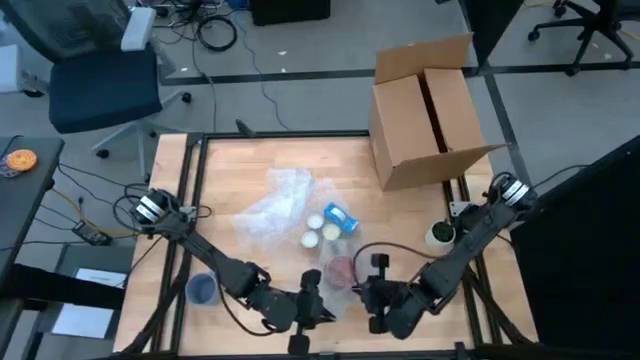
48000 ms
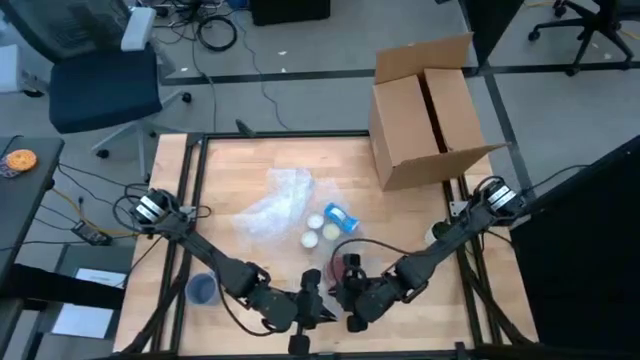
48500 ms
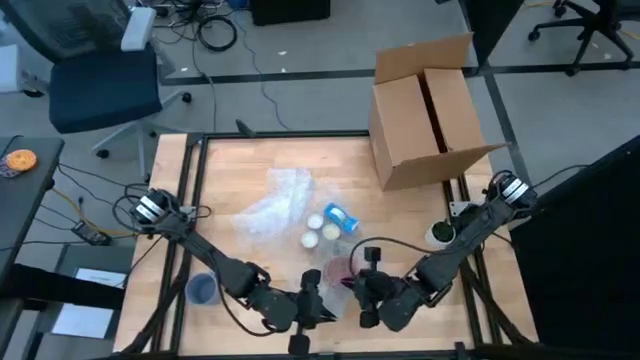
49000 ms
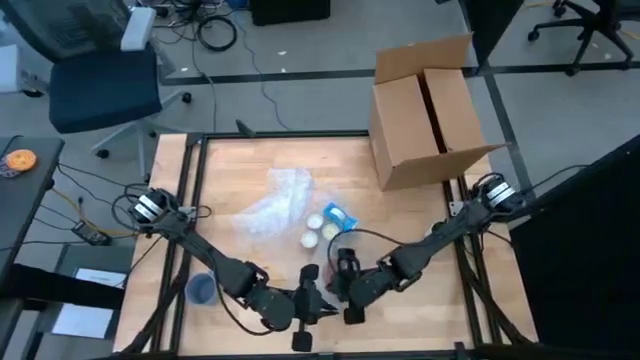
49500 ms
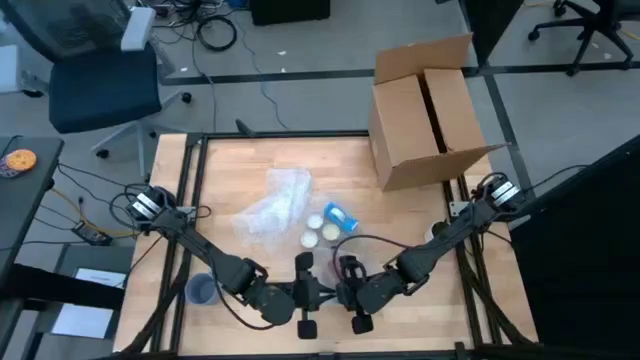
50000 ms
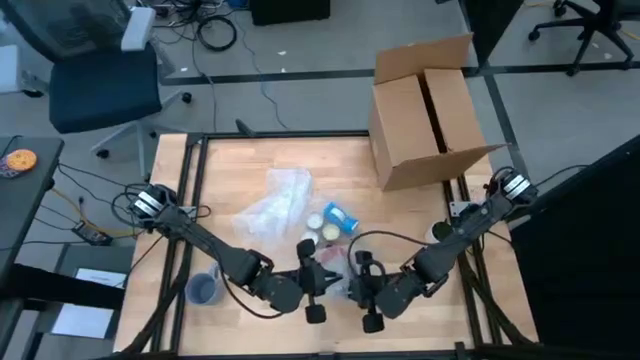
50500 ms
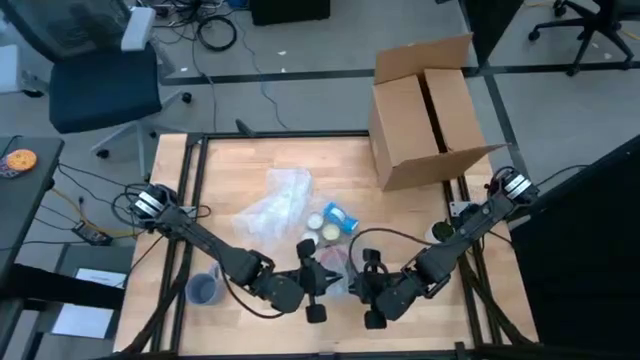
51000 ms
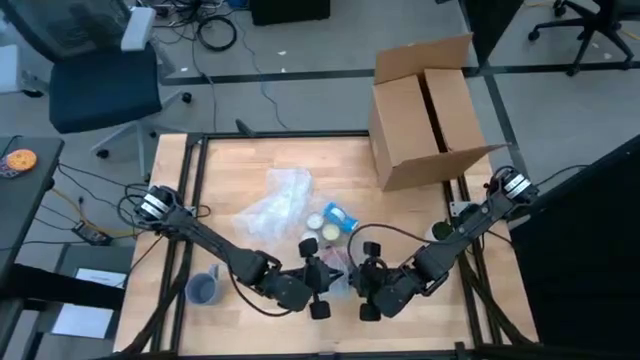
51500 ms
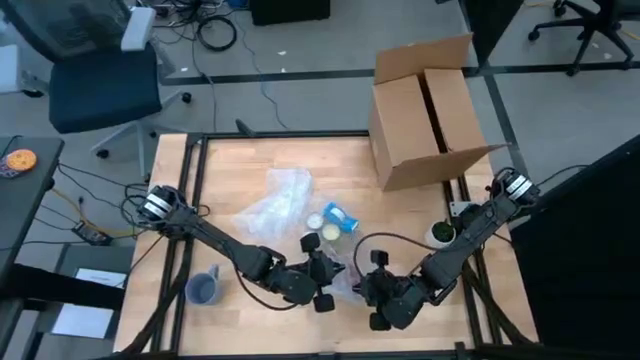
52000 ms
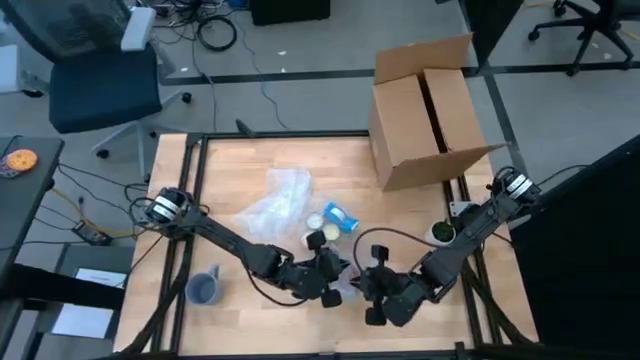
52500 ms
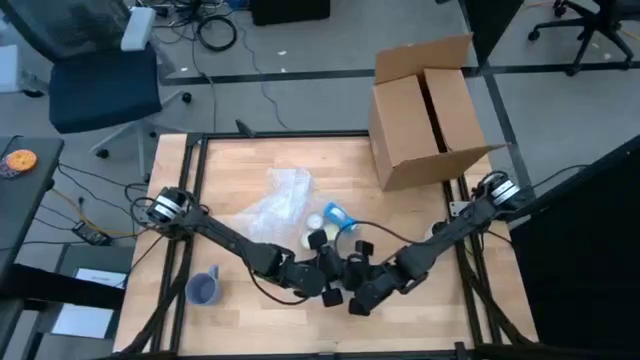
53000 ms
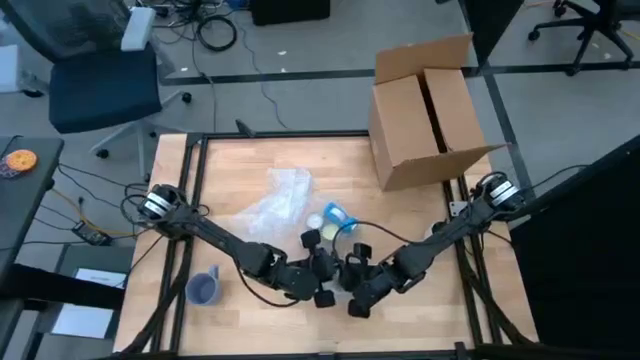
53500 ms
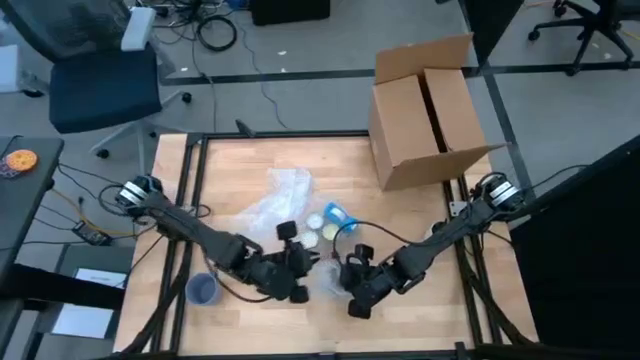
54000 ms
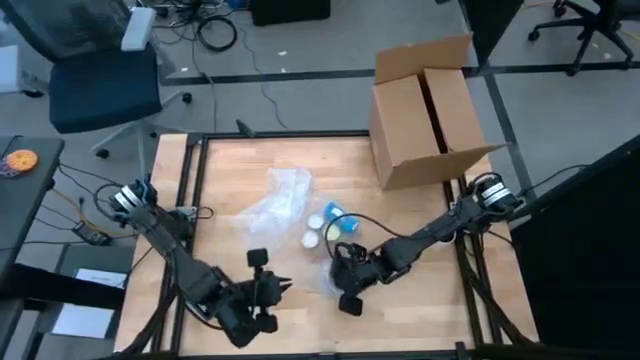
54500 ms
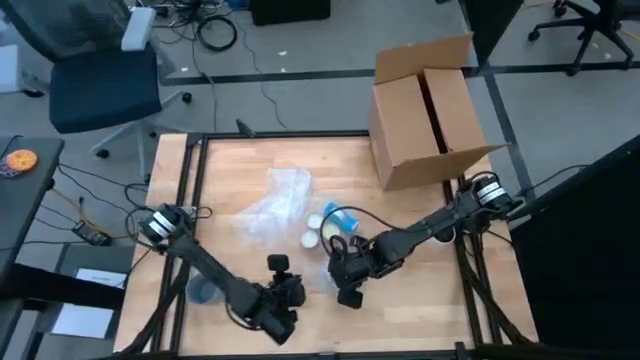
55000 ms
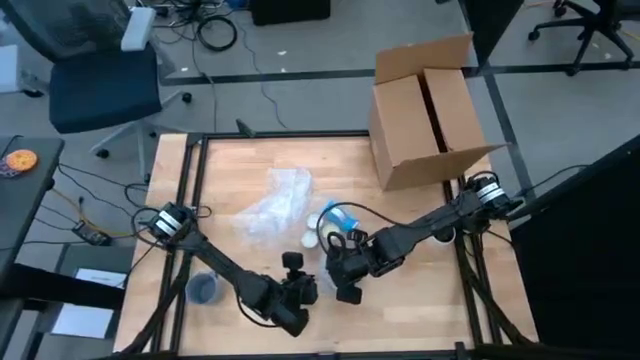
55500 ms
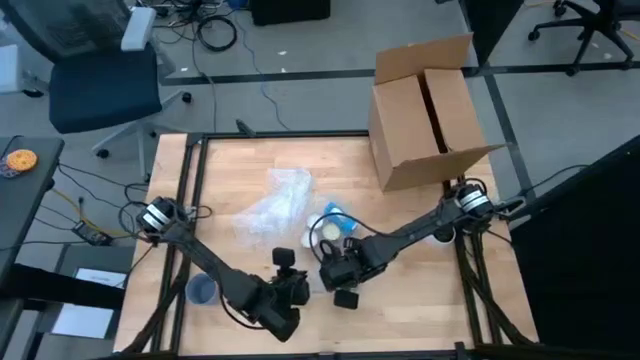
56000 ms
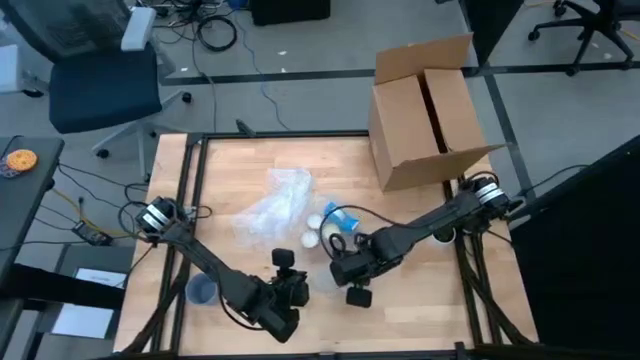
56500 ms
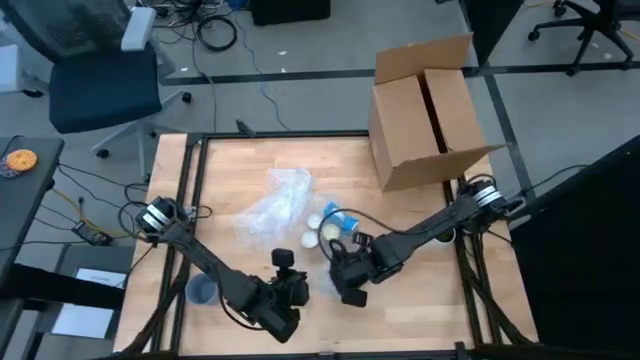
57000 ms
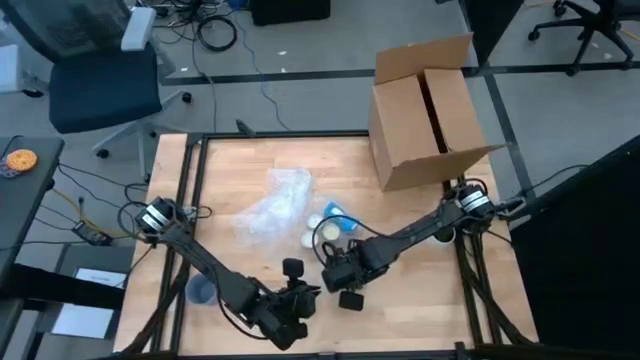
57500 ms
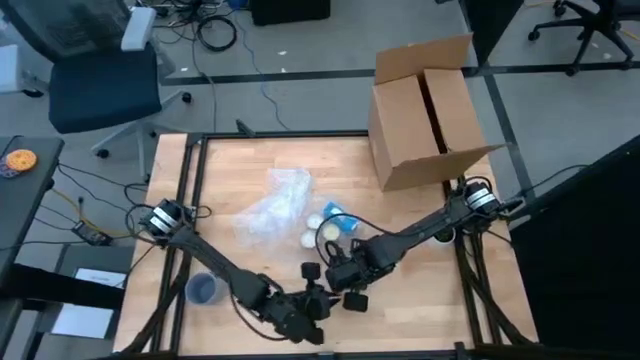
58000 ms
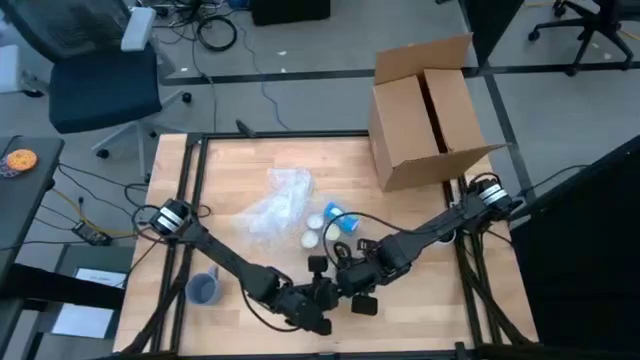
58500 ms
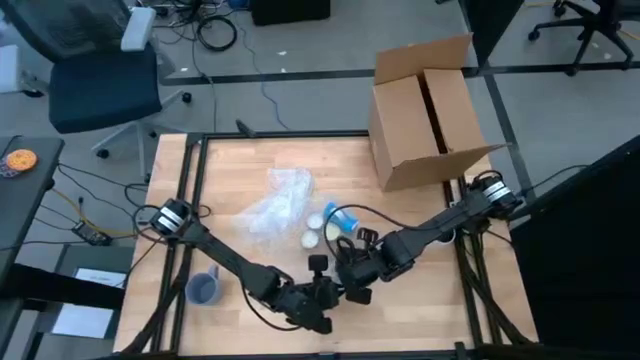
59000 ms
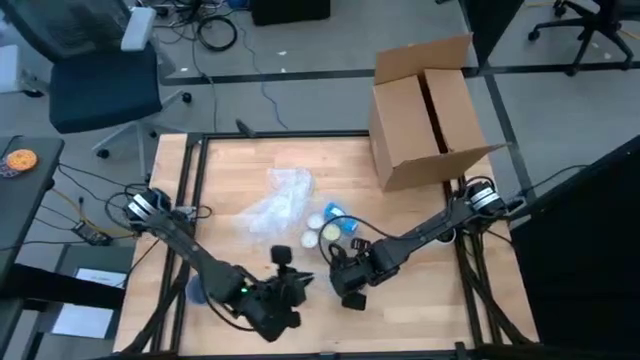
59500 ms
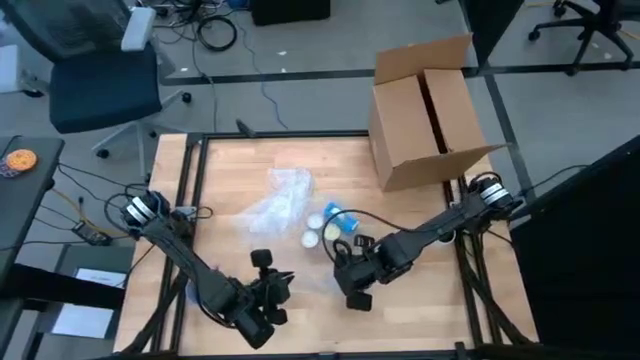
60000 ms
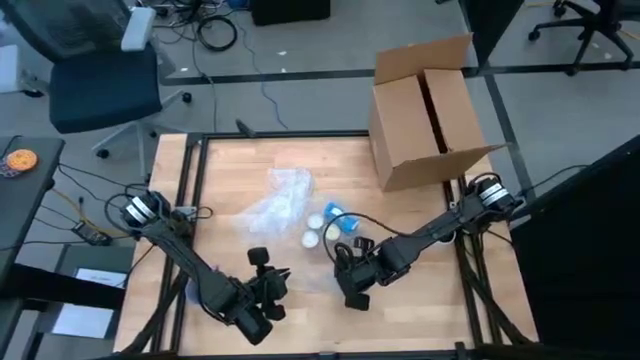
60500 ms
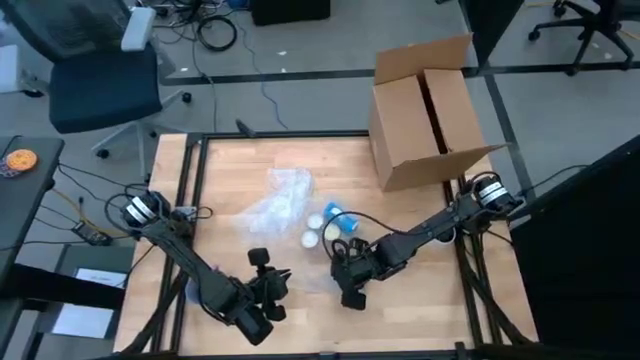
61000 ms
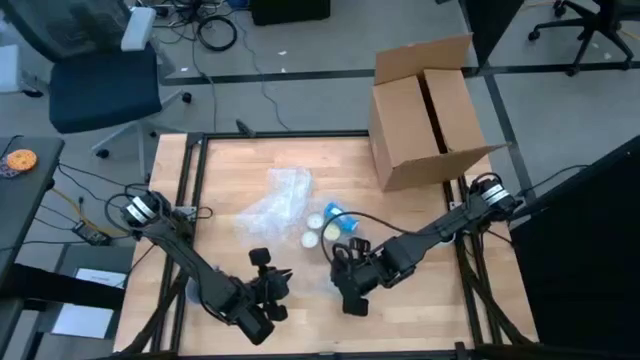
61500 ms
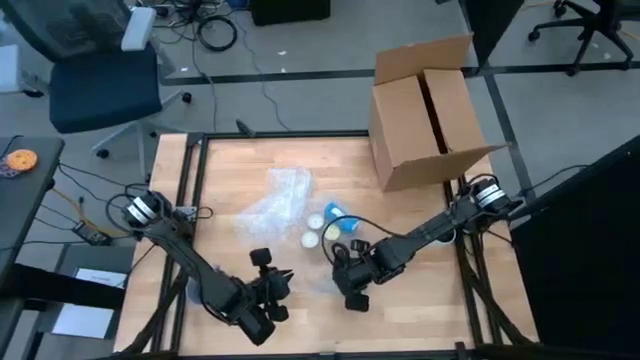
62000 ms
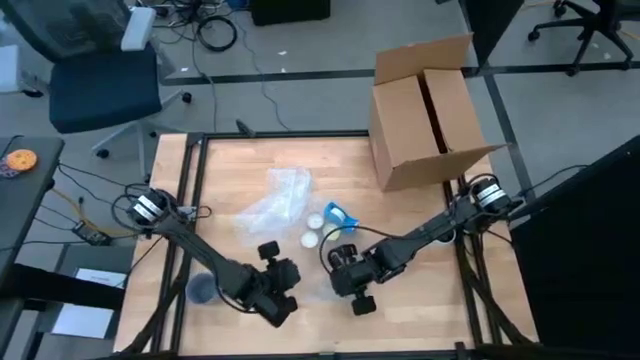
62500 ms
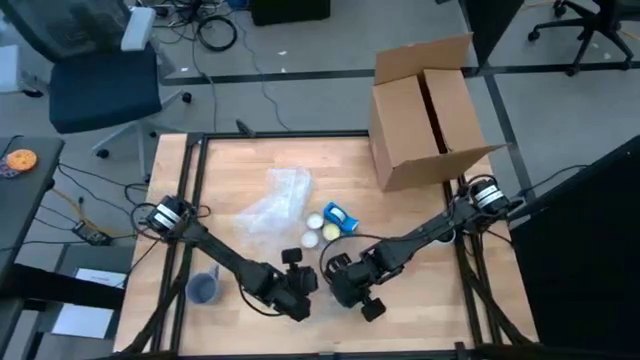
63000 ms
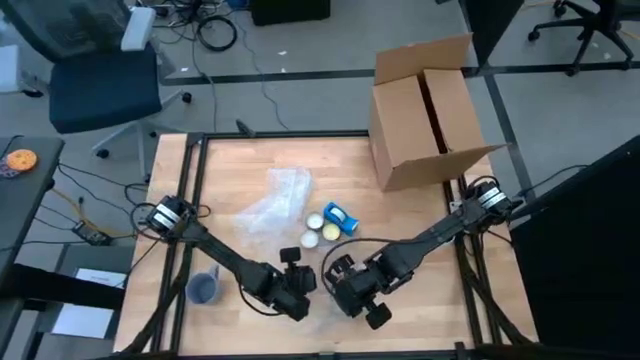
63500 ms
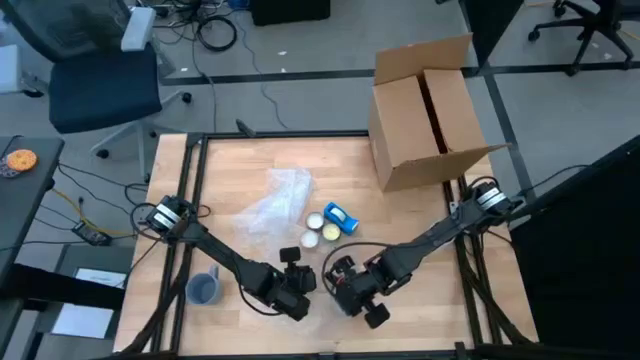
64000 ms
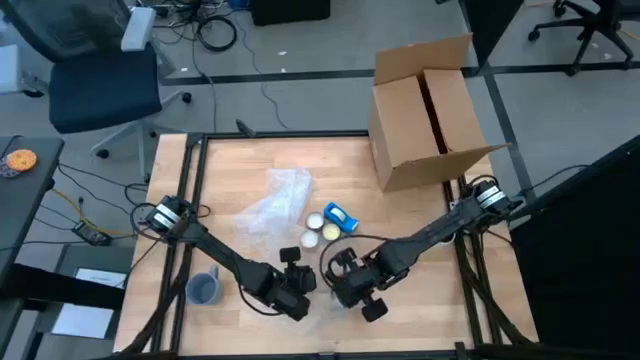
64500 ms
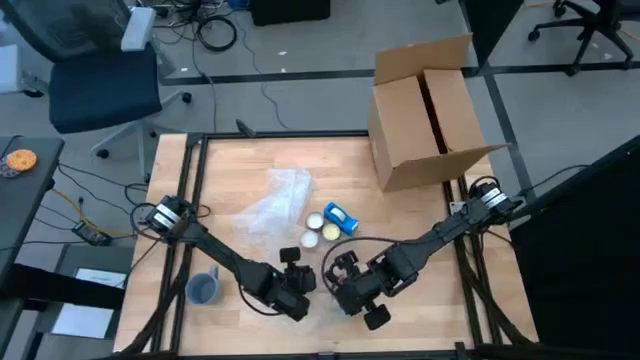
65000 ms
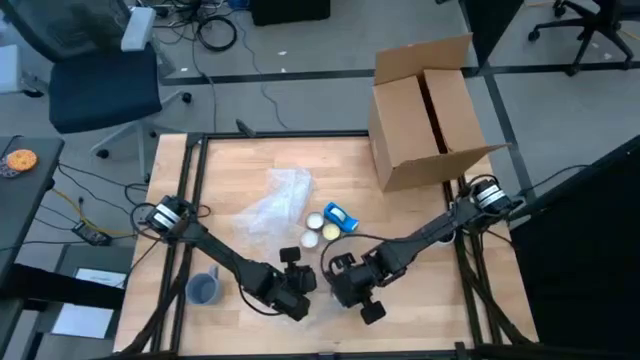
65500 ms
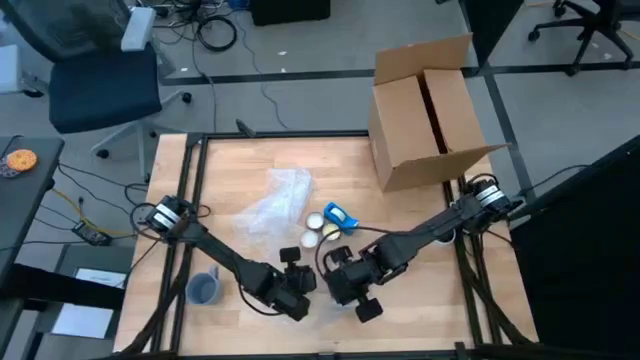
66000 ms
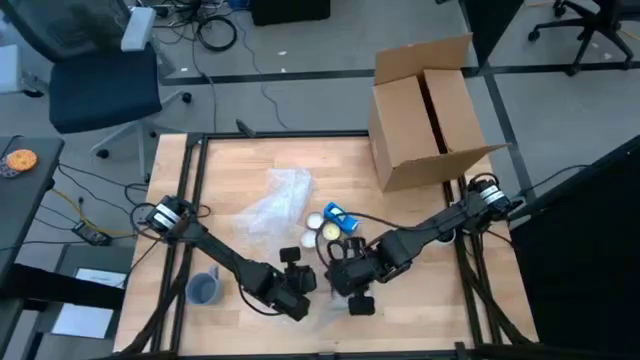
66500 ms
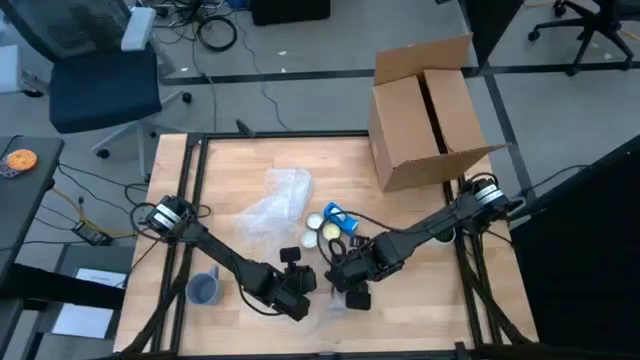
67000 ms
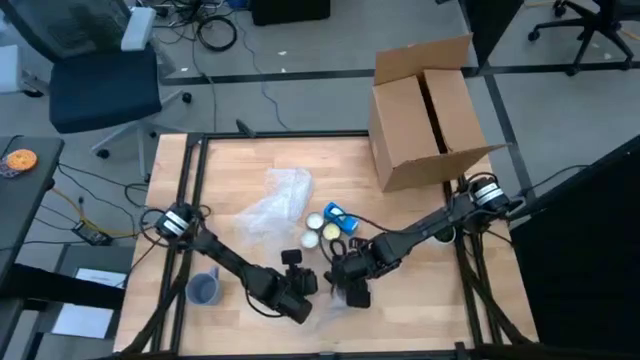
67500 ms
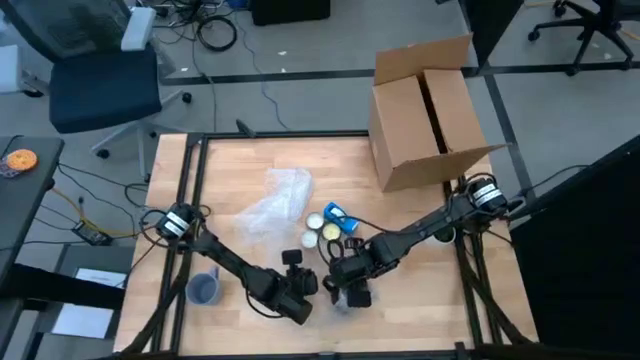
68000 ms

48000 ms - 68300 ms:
Task: wrap mug
Wrap the black mug with the transparent bubble wrap

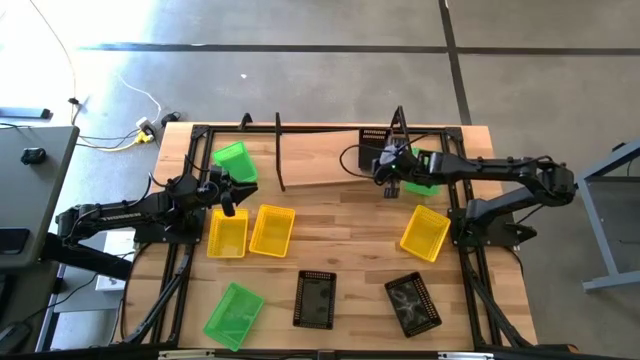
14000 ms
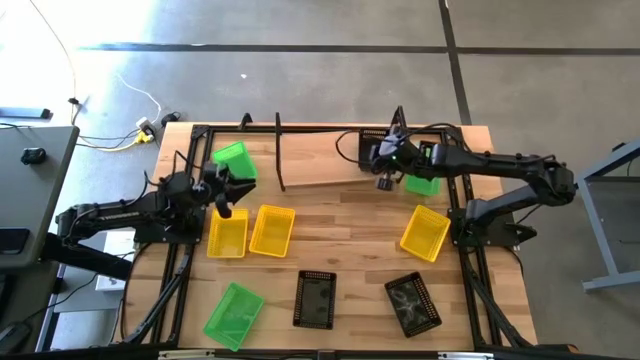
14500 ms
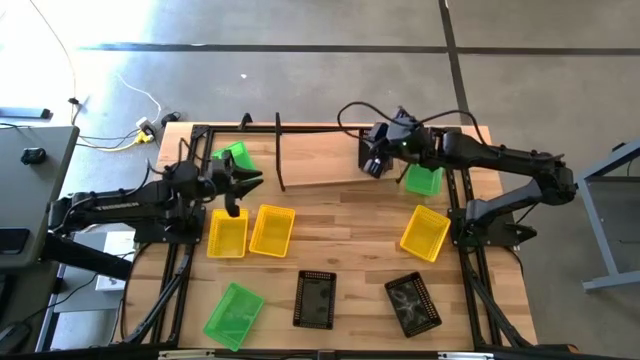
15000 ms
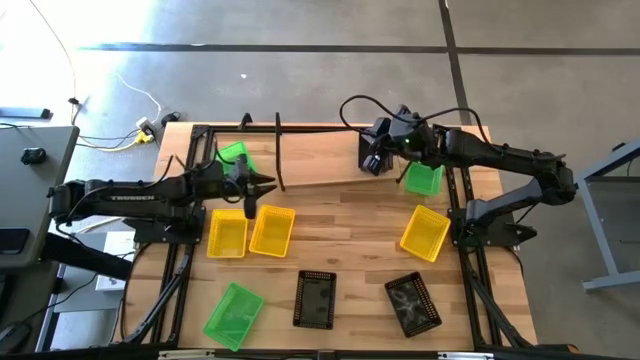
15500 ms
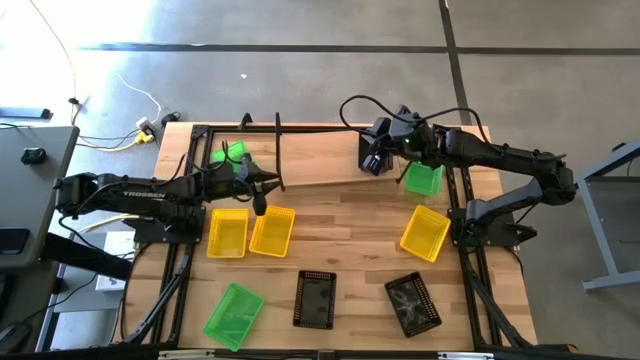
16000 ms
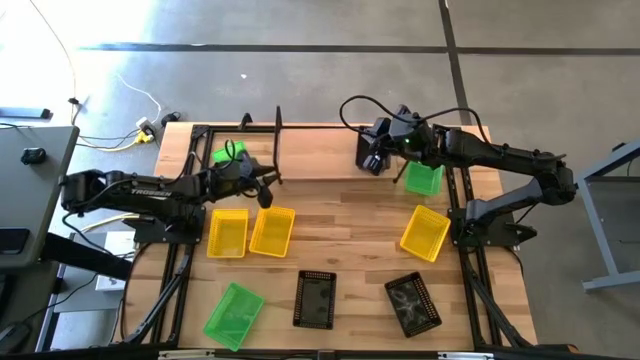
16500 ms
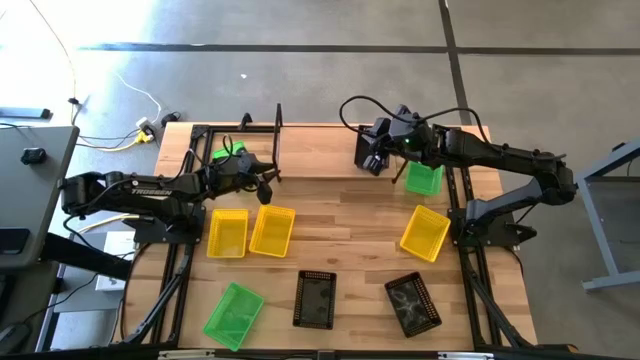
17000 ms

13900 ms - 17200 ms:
Task: Stack baskets on shelf by color
Adjust the shelf
